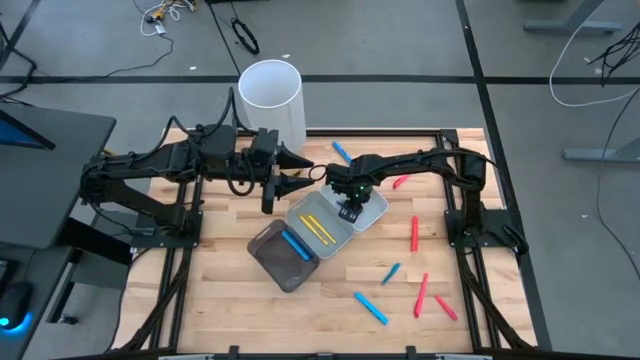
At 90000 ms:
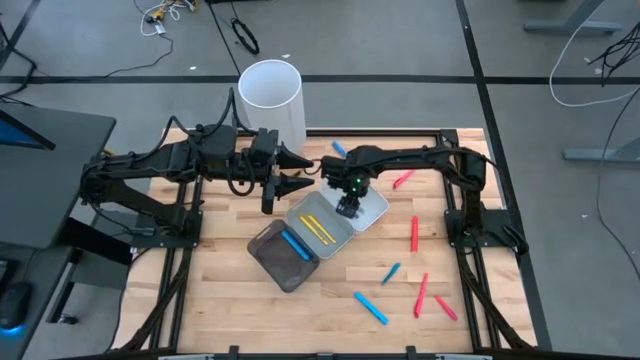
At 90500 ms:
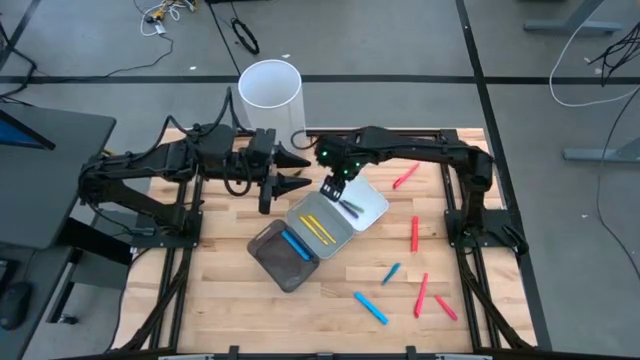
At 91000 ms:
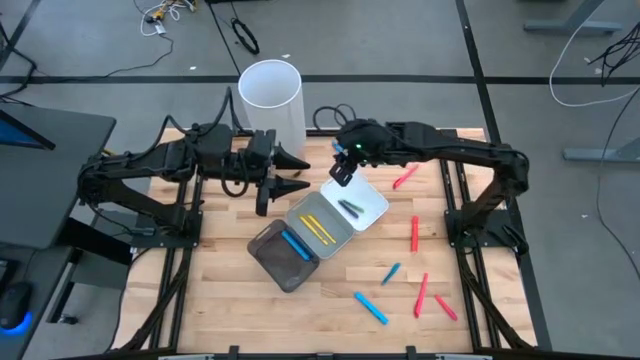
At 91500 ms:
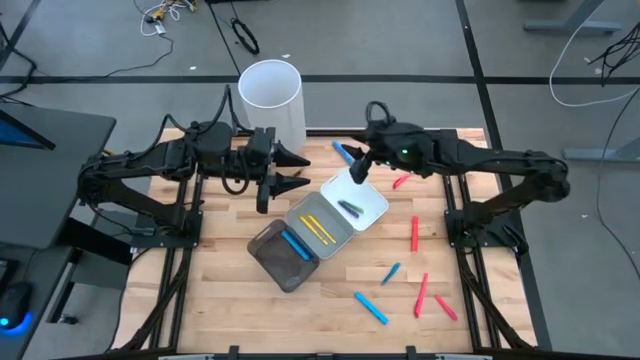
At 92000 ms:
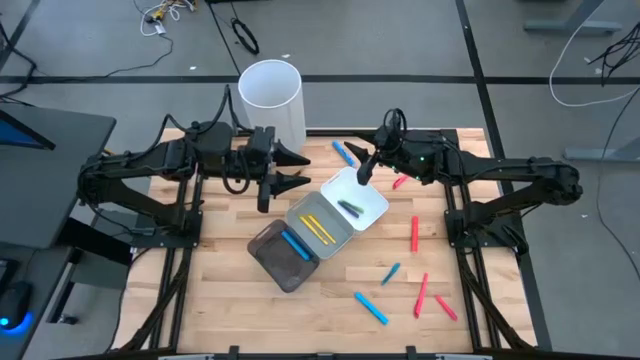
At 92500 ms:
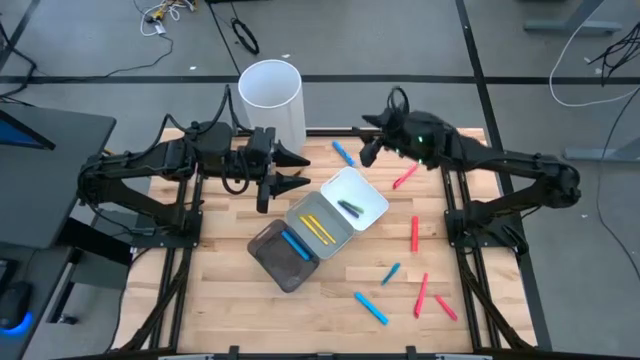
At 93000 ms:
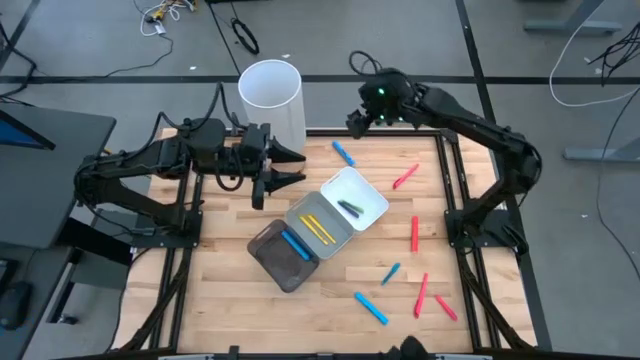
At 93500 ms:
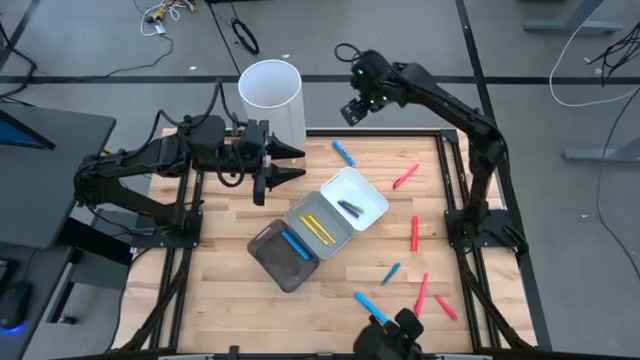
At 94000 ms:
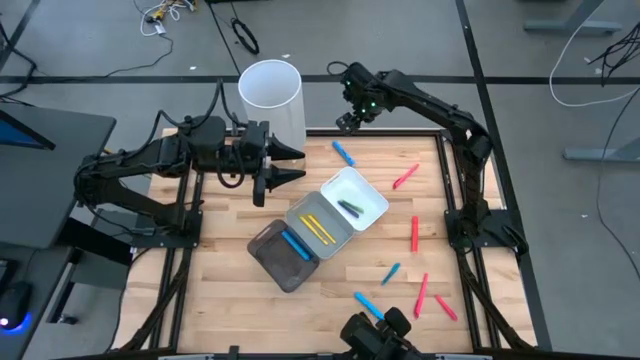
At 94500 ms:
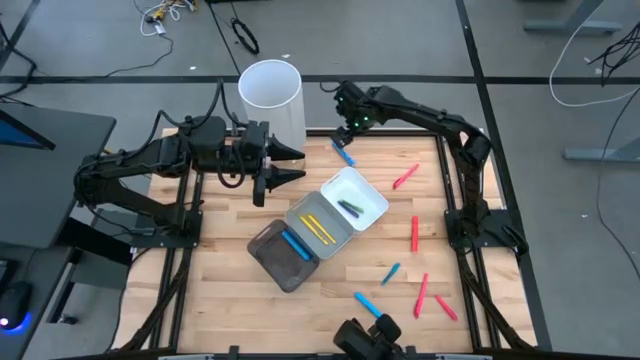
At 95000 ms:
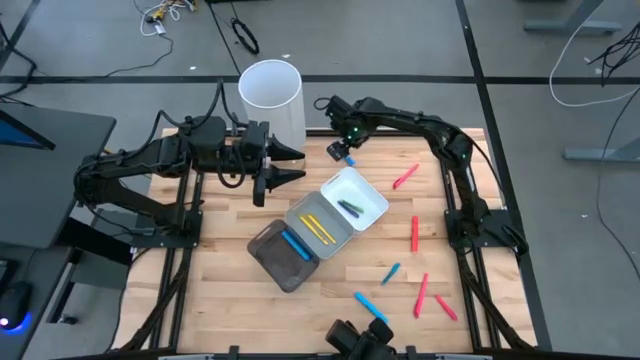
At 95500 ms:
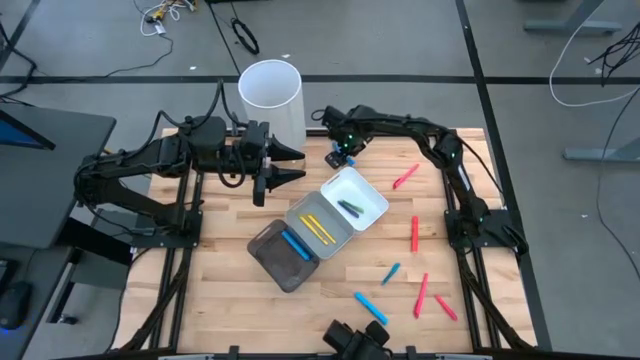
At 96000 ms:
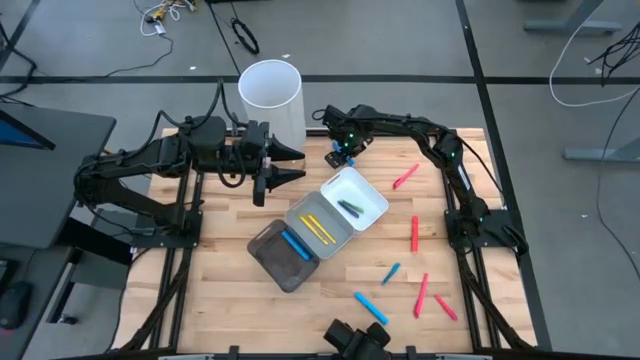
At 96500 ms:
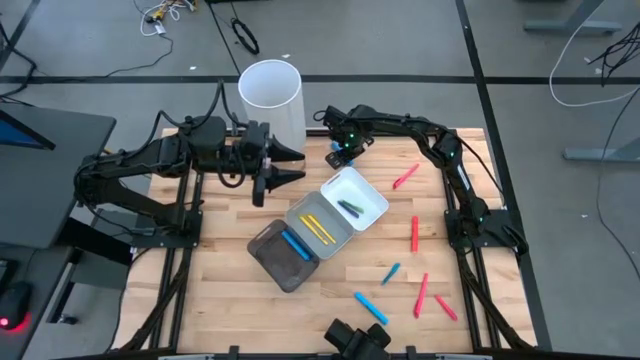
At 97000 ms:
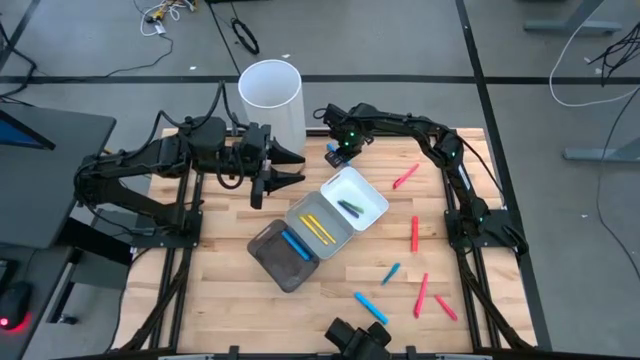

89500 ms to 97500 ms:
Task: Pick & Place Markers
Put the top blue highlighter into the black bin

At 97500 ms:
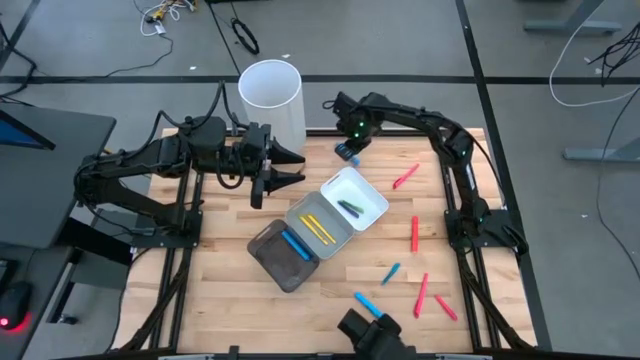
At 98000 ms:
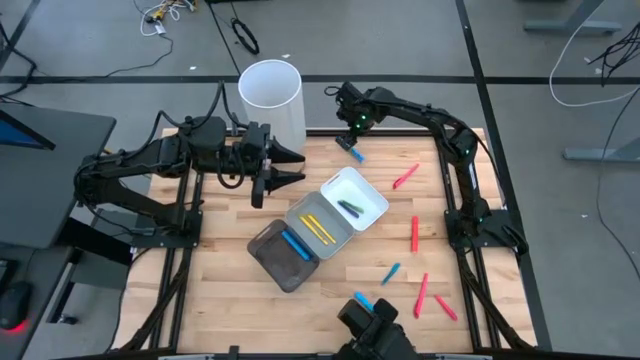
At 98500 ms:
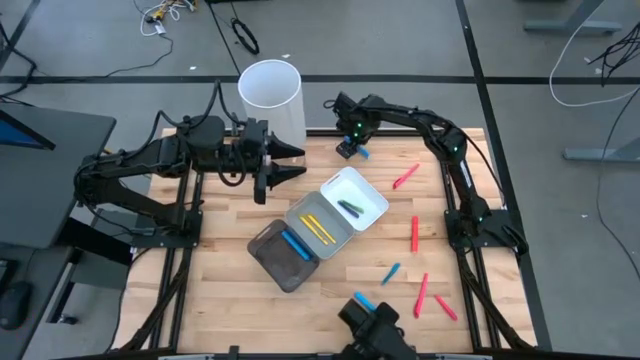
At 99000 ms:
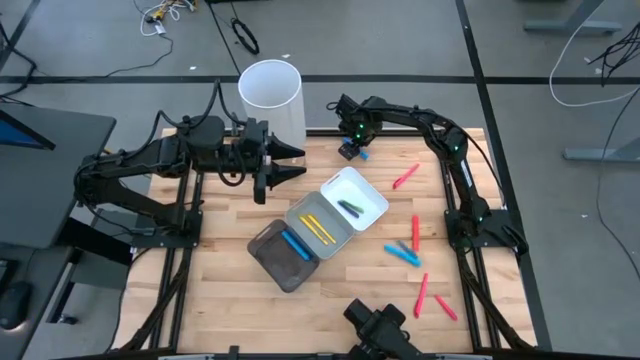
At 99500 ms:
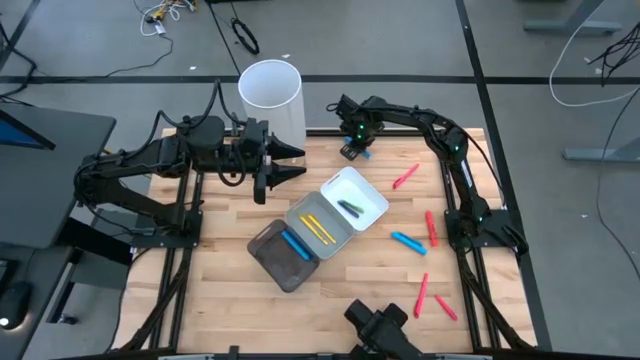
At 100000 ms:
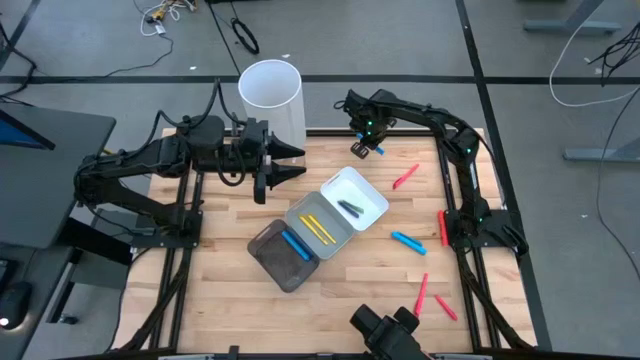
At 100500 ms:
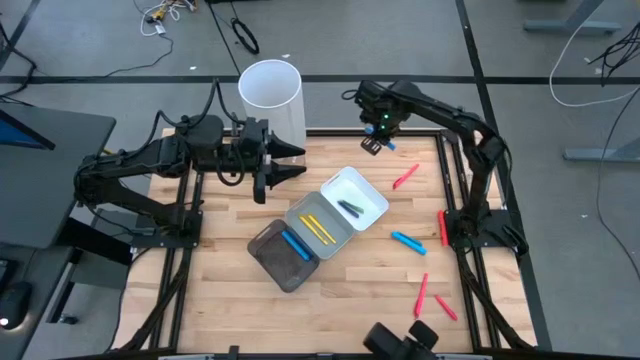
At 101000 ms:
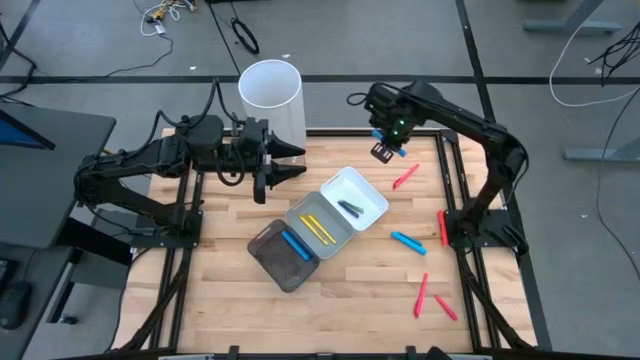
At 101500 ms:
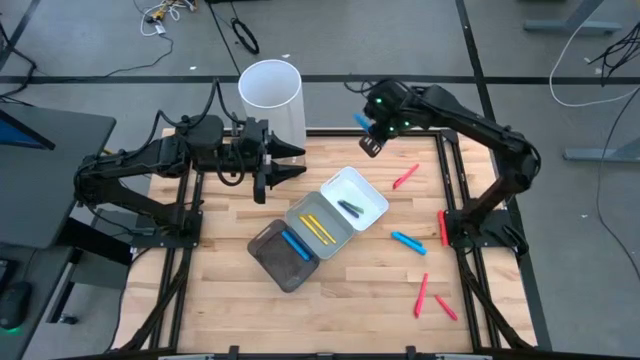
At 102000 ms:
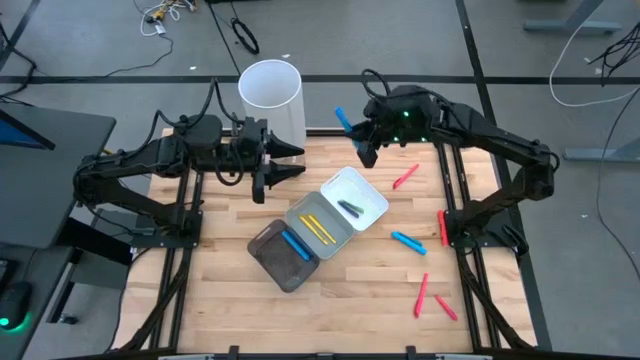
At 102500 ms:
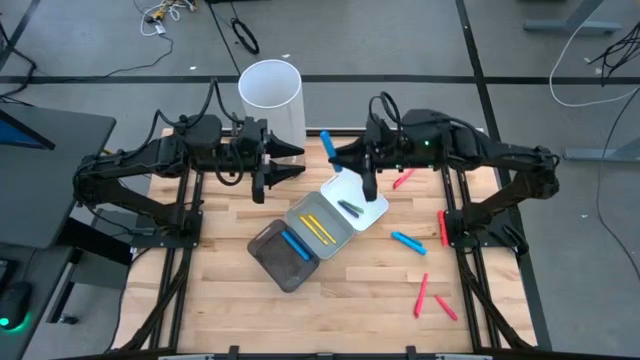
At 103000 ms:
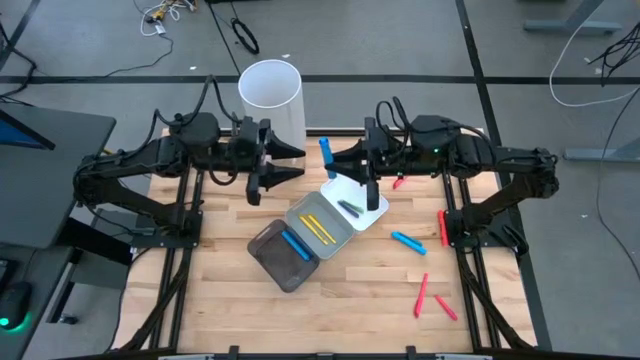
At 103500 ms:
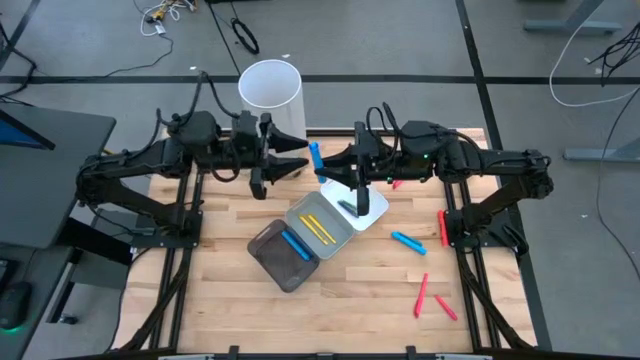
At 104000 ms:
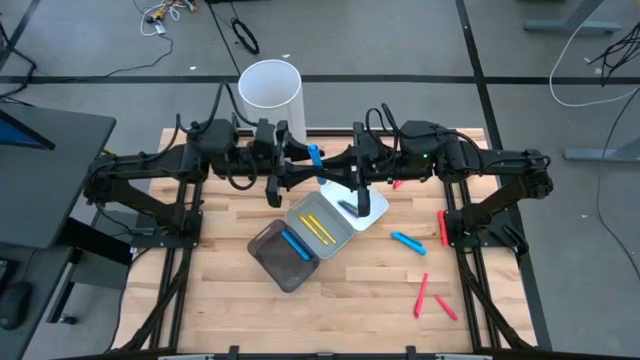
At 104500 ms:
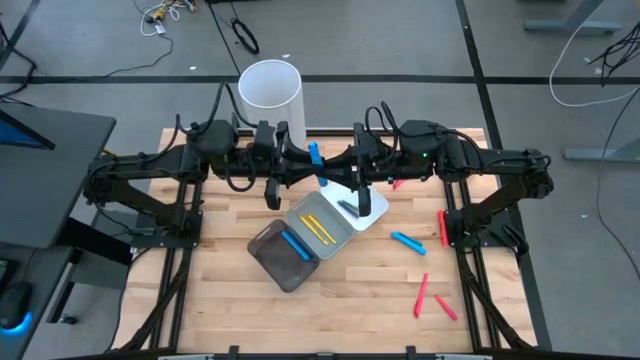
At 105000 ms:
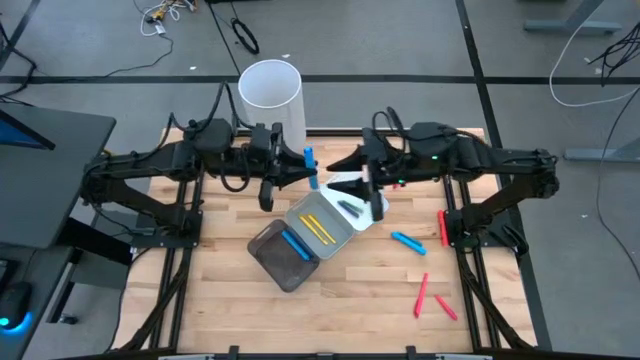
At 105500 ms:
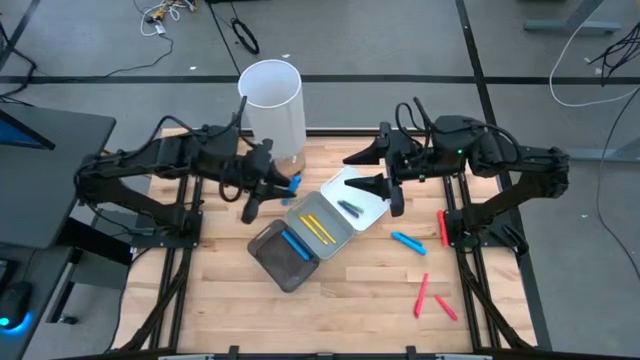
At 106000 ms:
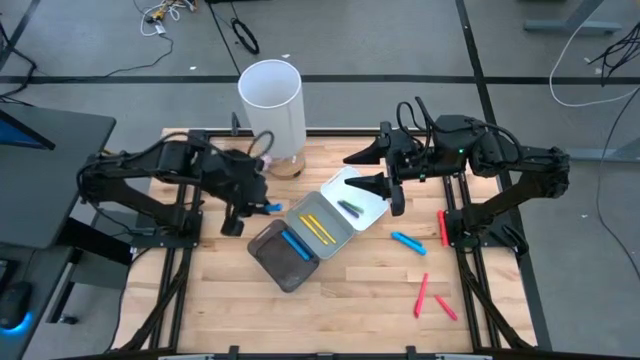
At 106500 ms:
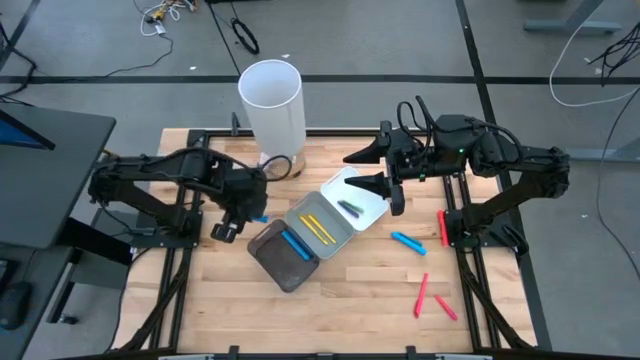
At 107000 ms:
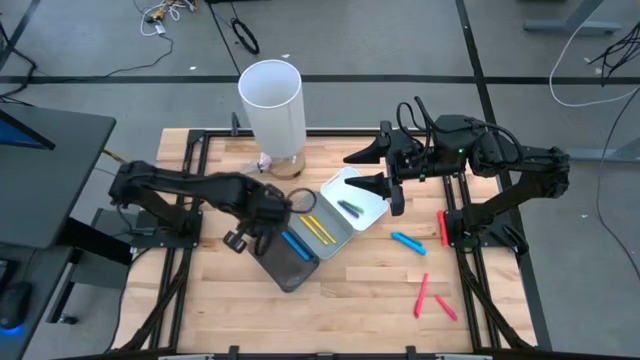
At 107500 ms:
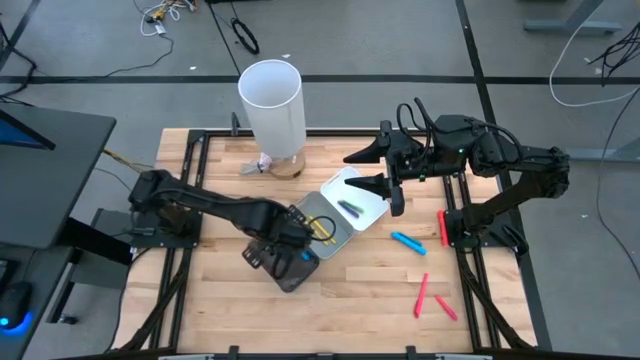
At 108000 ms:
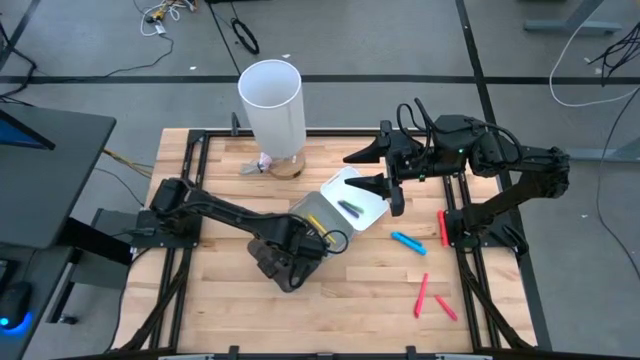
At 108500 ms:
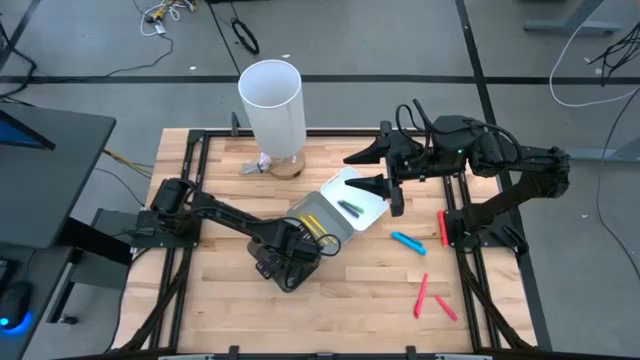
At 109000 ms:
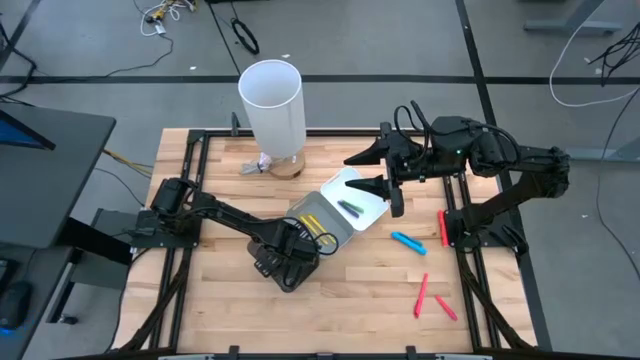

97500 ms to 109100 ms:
Put the top blue highlighter into the black bin

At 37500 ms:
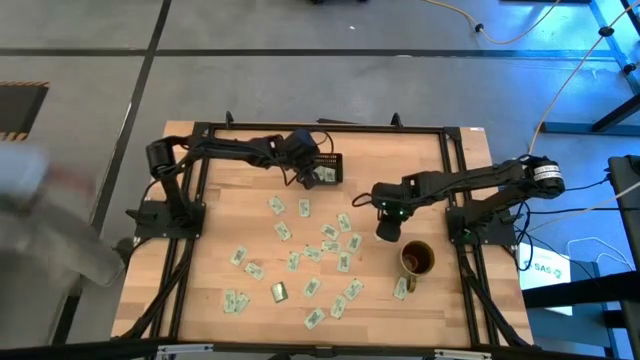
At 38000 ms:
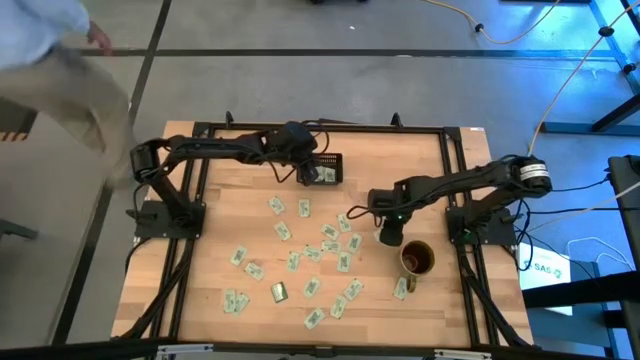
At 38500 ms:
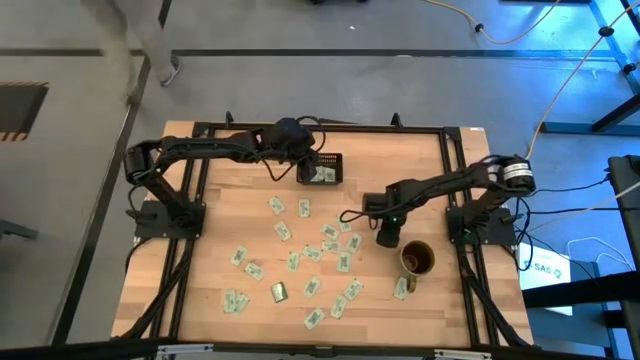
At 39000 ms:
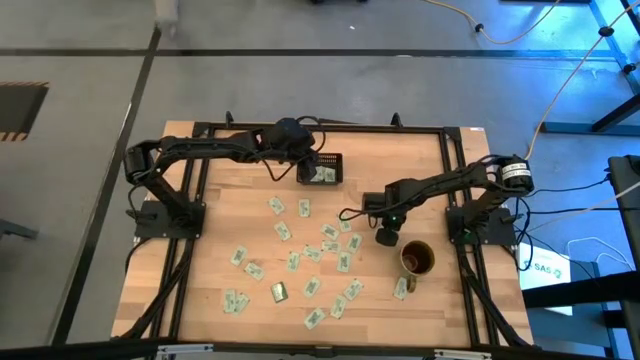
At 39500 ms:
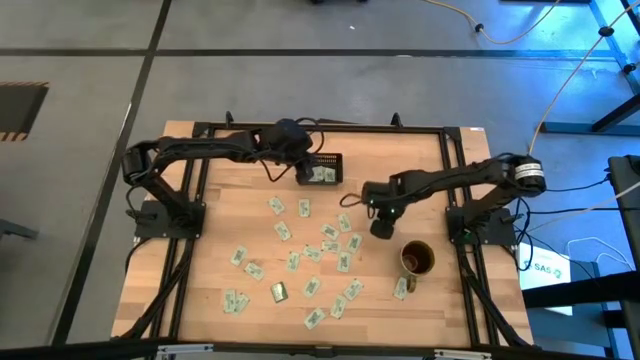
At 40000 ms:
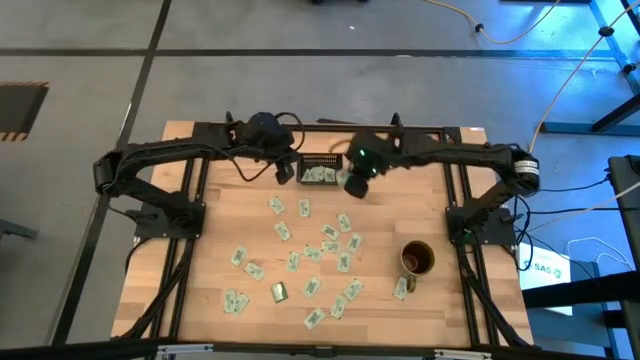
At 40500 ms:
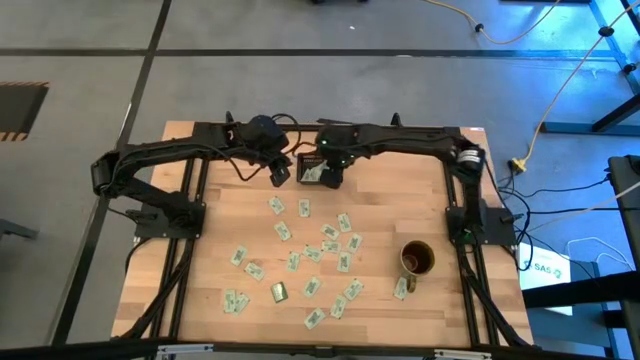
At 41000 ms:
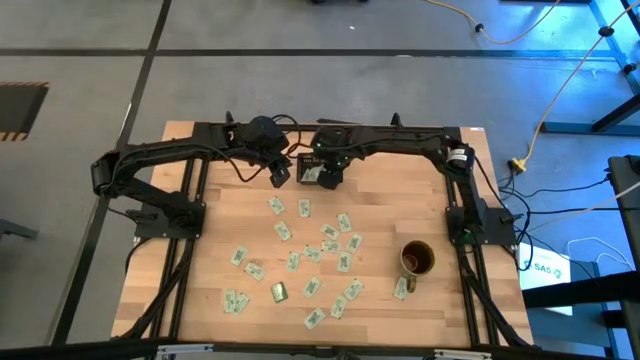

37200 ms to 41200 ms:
Task: Pick and place Stevia / Truvia into bins
Put the white stevia packet into the black bin
